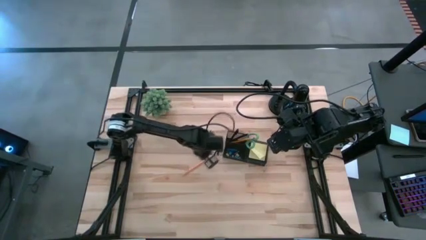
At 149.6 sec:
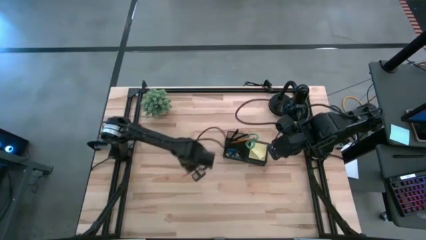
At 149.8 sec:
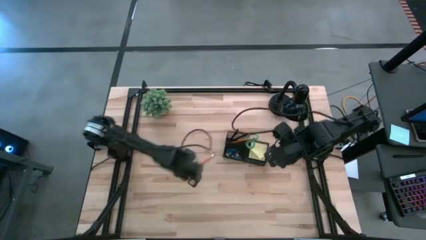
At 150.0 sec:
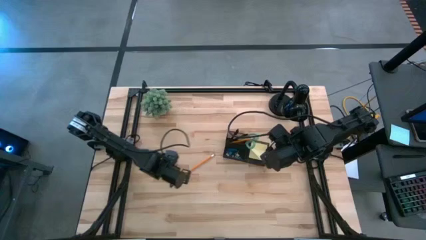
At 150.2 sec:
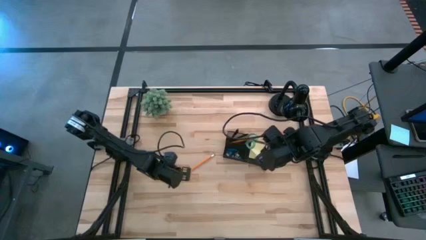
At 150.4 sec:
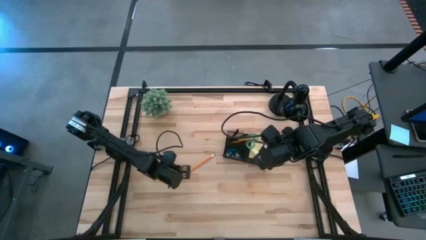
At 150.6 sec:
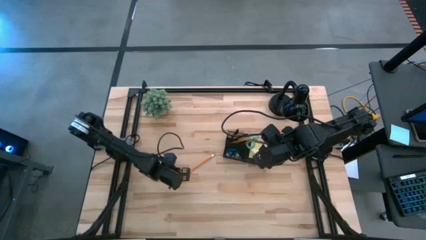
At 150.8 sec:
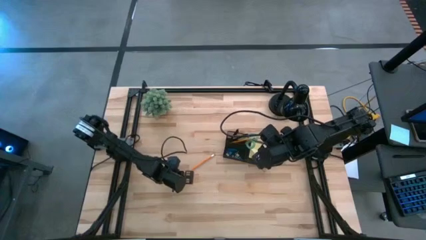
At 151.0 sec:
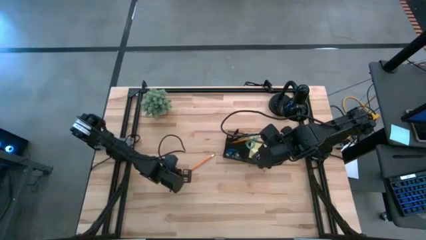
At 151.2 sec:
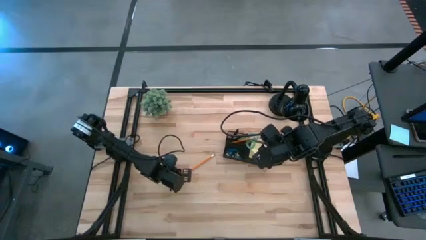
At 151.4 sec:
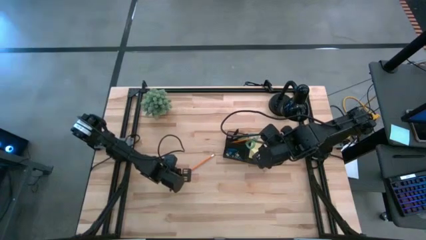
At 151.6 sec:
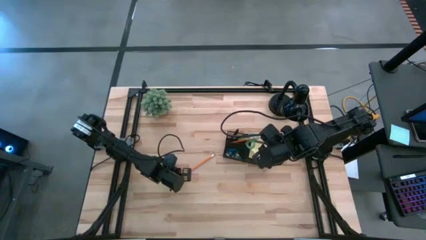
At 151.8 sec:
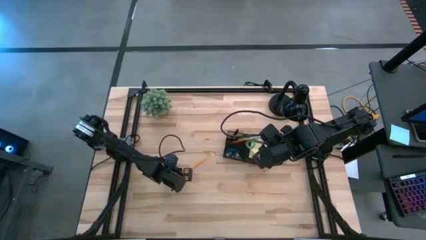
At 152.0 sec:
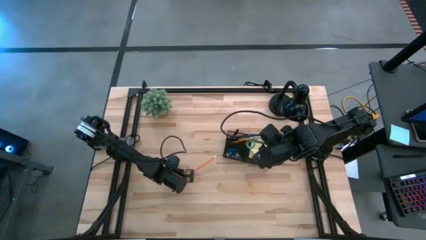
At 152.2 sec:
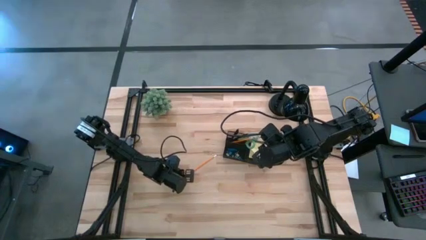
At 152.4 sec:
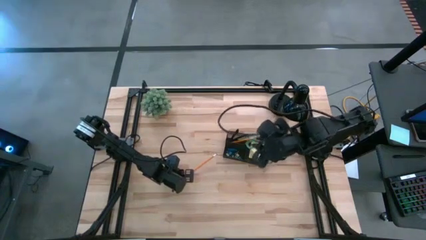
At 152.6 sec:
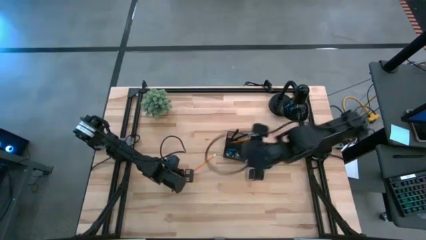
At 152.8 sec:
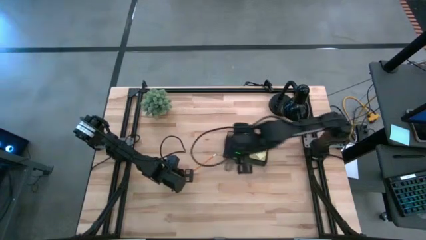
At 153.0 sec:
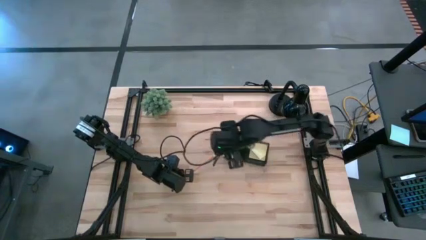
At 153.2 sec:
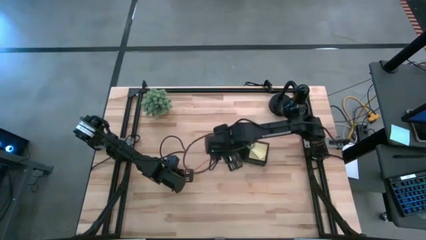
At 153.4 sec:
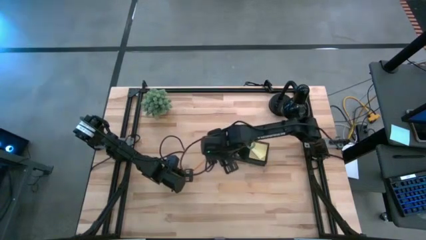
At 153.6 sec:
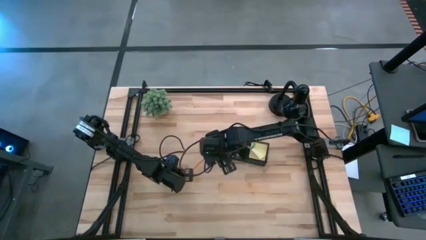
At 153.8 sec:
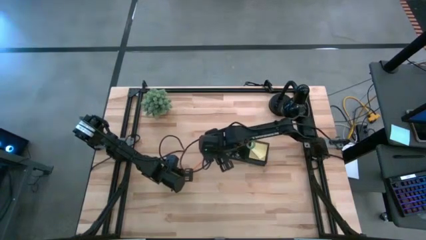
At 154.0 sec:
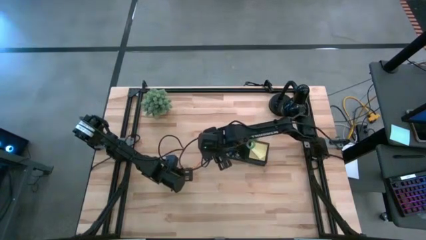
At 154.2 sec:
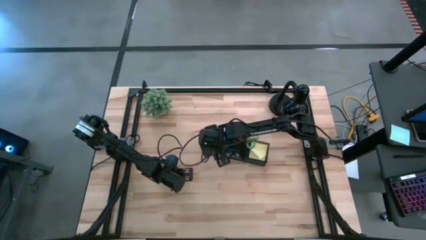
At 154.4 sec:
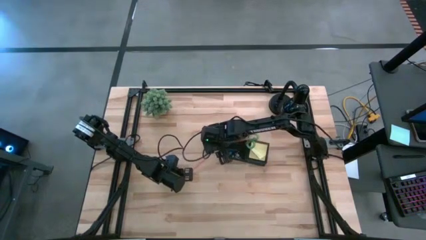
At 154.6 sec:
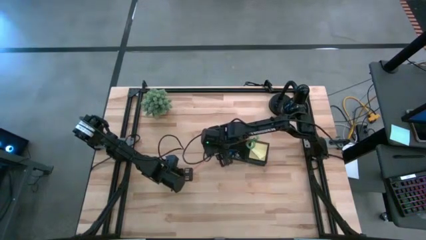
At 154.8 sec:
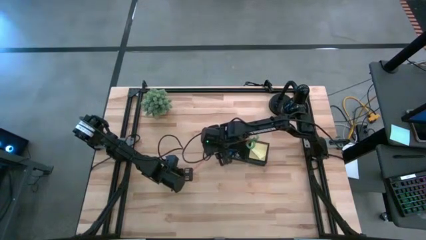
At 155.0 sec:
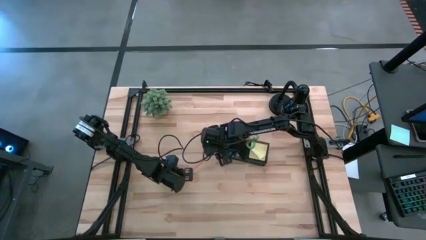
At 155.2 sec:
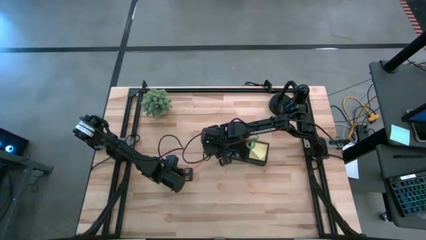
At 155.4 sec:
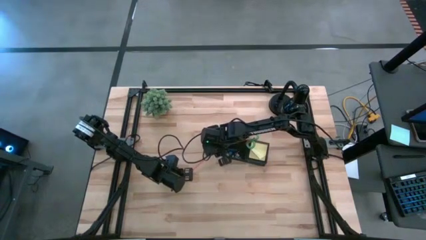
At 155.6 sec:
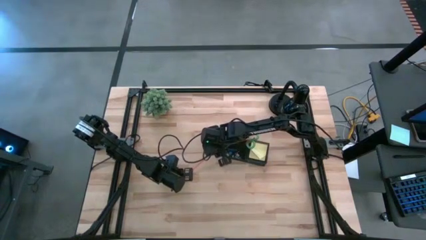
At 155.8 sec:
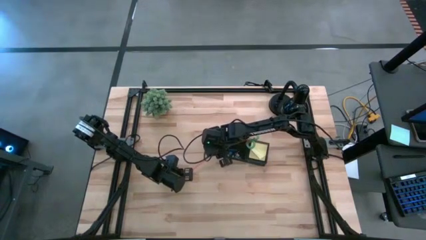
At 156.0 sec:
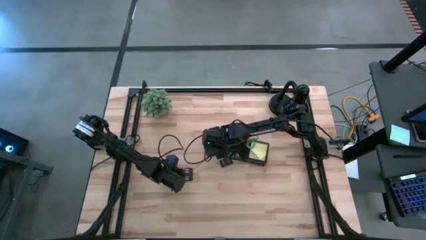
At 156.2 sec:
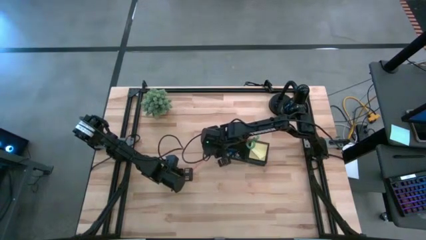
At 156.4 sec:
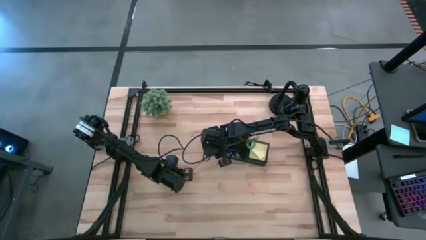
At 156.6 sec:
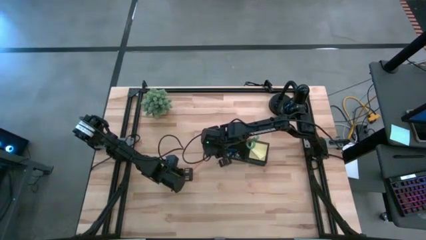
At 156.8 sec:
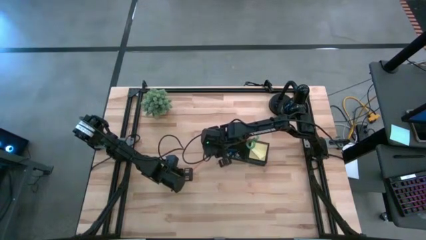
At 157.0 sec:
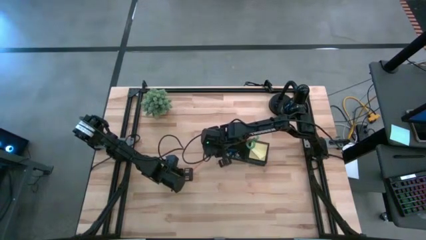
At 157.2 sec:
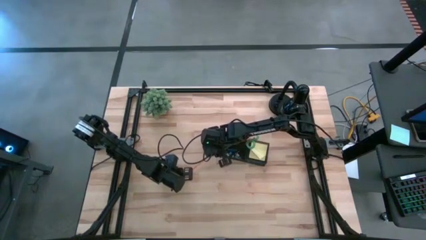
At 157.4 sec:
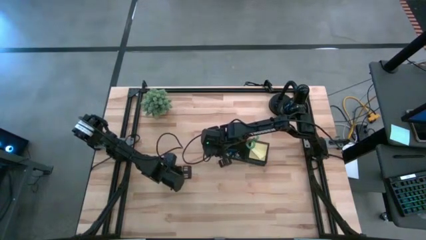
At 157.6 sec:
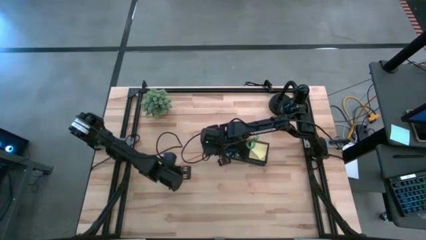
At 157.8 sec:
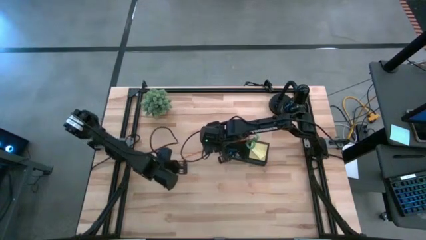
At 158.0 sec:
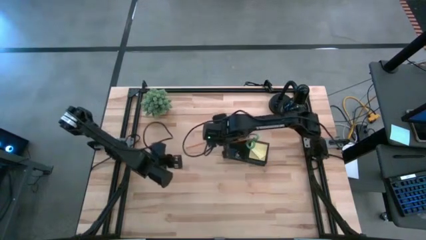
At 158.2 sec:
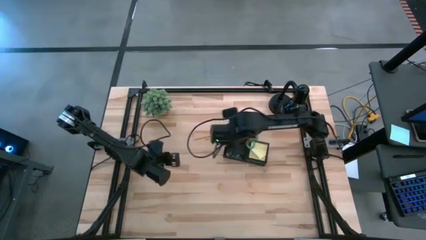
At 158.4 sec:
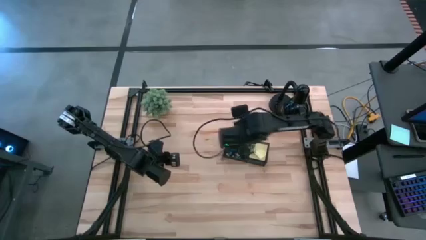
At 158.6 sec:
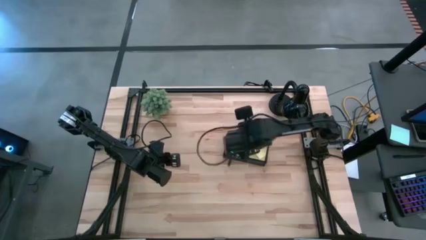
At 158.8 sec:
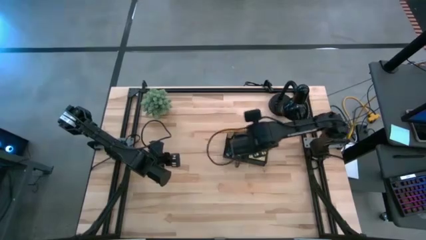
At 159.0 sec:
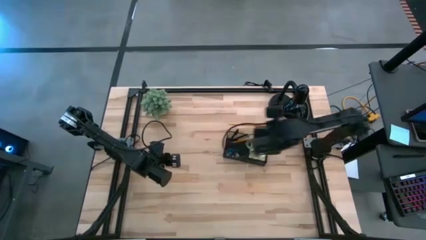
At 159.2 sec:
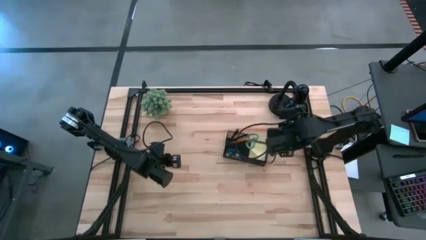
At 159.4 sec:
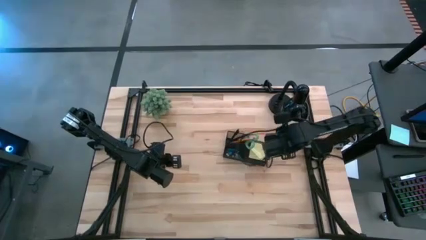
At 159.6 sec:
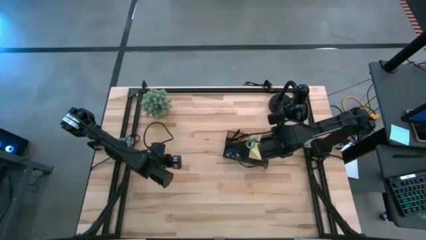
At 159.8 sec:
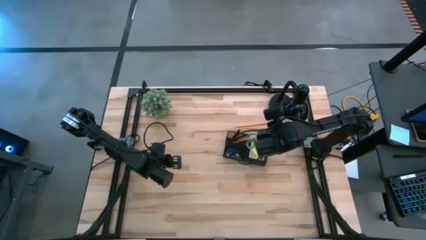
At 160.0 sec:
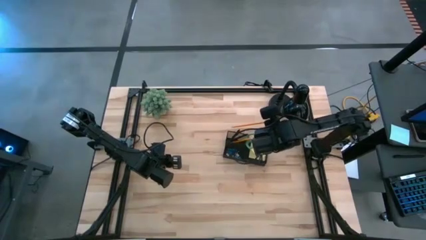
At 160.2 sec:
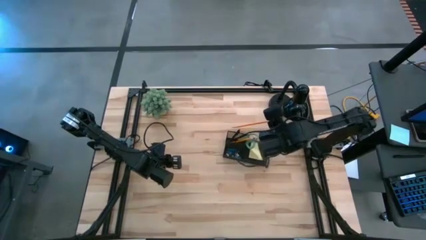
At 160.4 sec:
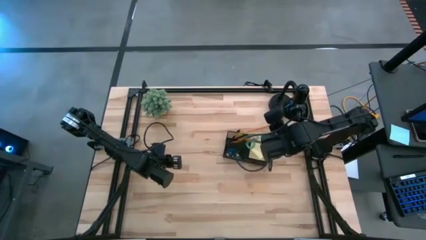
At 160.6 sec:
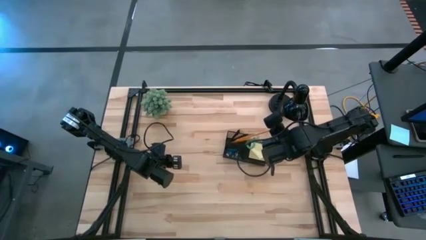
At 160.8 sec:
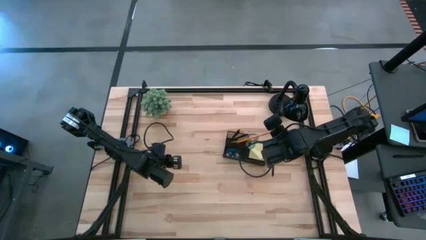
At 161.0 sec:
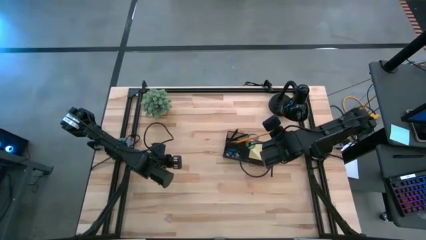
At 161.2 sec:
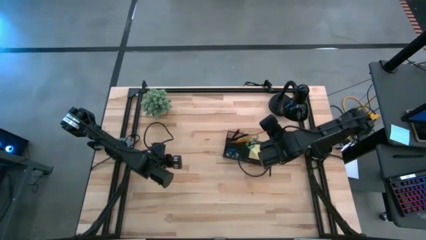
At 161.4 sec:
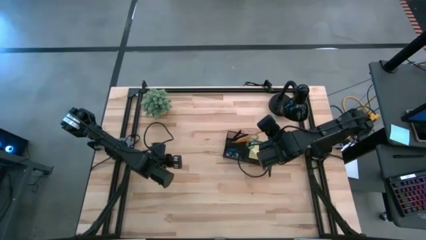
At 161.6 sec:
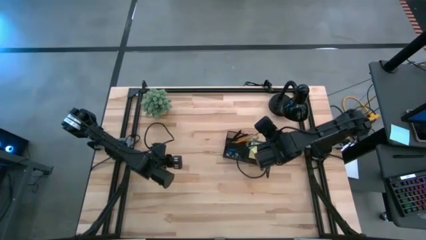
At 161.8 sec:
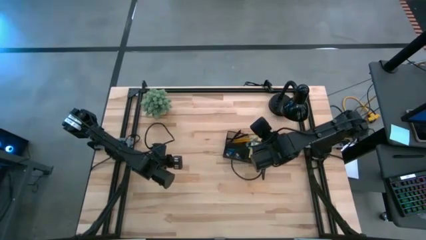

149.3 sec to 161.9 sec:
Task: Pick and place office supplies into organizer
Put the right orange pencil into the black mesh organizer

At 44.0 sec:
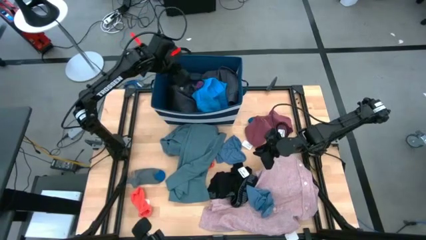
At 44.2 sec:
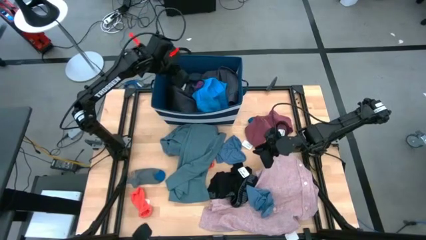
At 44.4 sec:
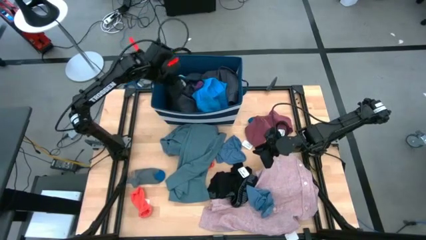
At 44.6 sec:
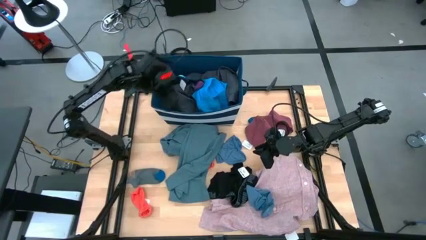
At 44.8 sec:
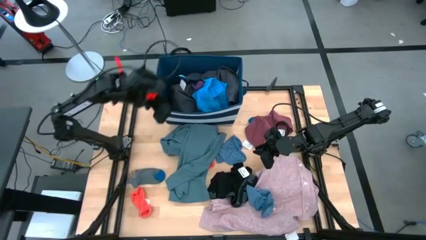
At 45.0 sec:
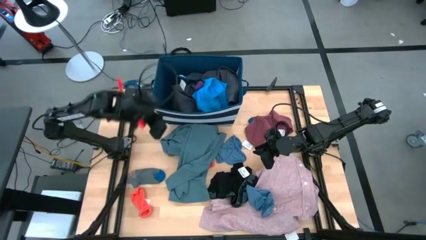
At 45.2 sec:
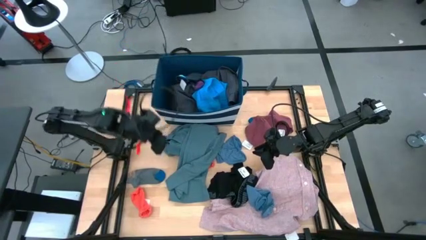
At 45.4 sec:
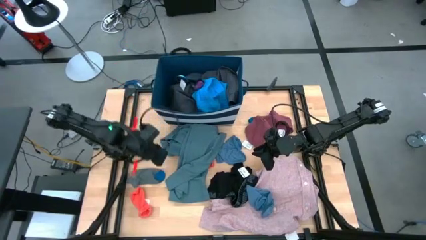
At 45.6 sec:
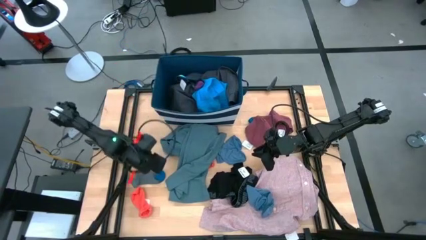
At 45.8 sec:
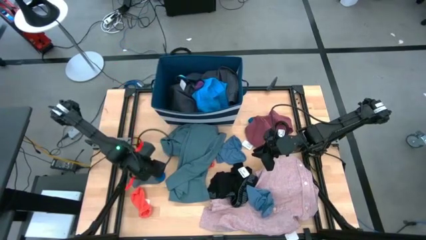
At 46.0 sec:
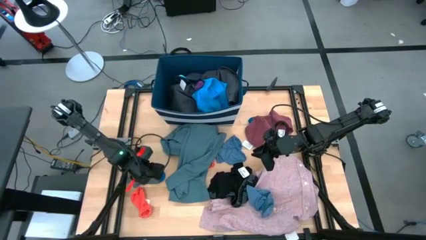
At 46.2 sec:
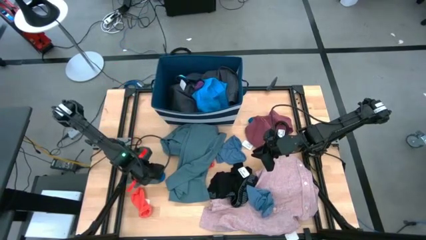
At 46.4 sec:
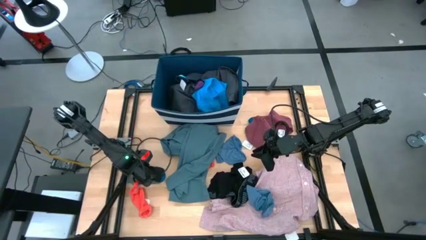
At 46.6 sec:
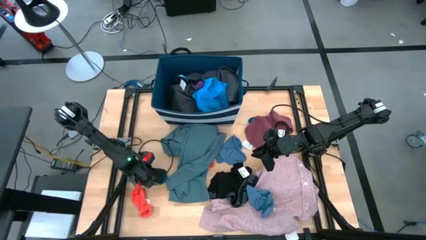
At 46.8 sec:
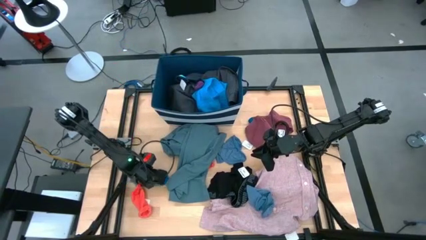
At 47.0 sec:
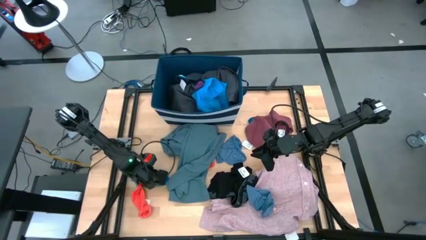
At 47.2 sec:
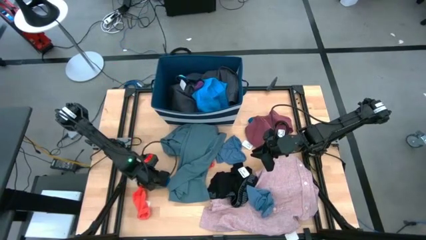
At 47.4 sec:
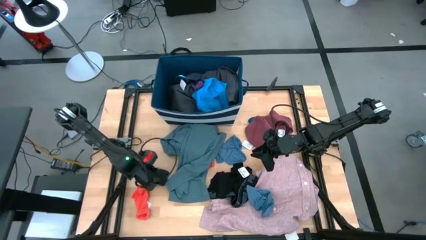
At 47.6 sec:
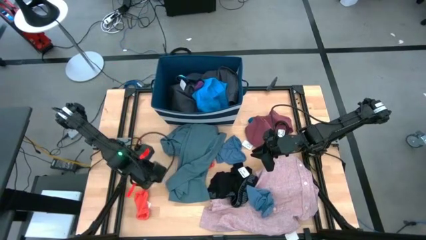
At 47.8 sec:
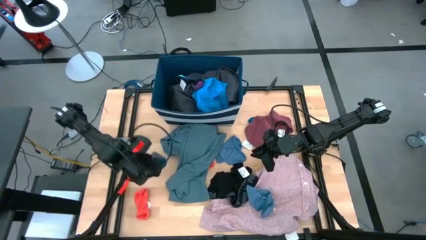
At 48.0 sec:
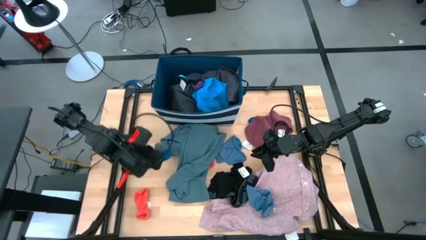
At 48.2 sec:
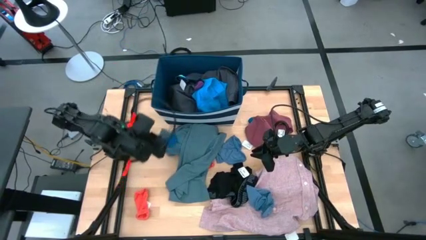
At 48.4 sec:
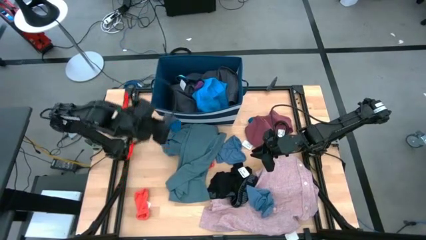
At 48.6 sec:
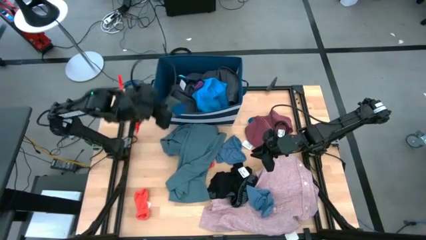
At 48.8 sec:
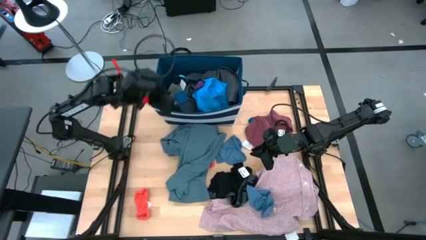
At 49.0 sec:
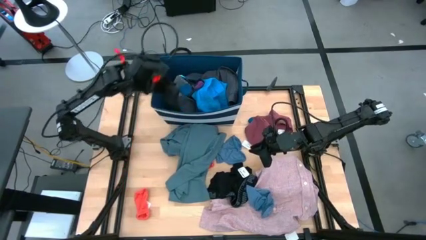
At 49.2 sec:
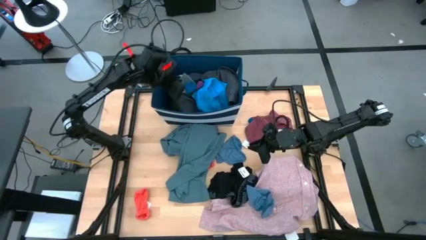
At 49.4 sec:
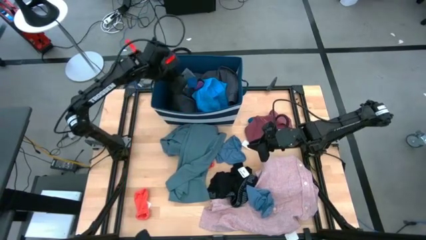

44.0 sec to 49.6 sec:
Task: Sort clothes
Put the left gray sock into the blue bin
